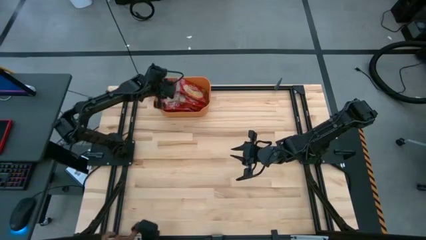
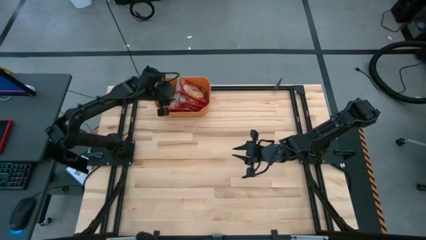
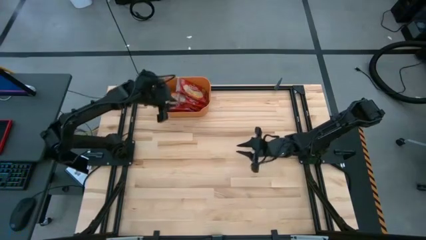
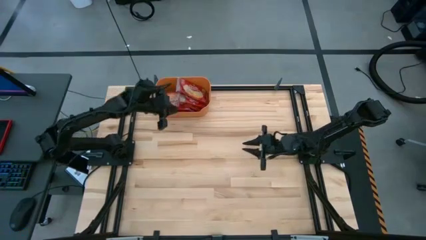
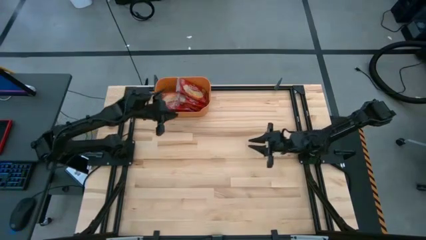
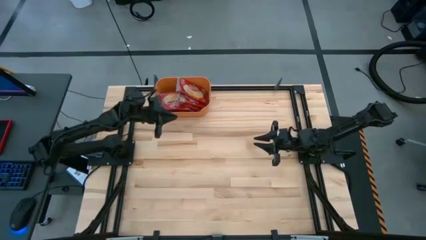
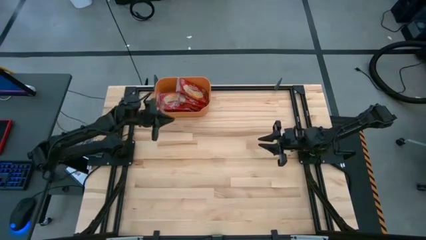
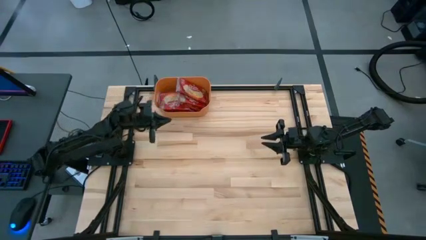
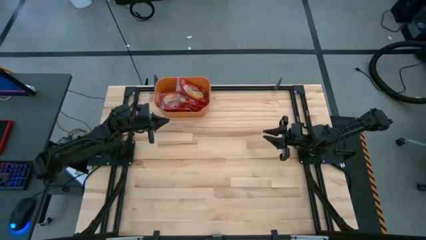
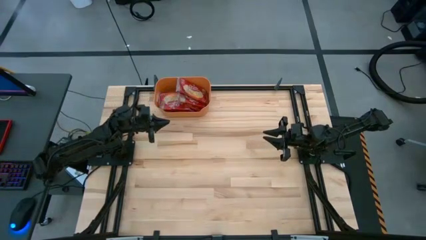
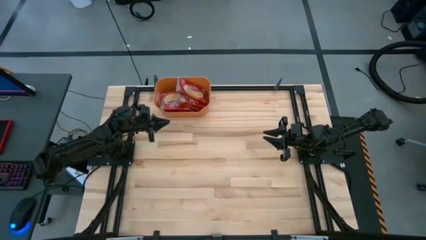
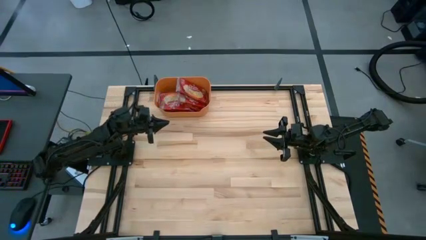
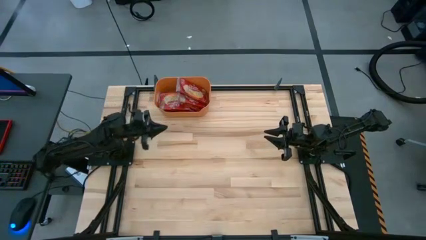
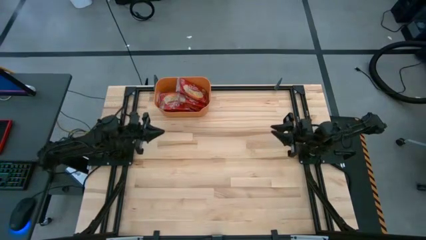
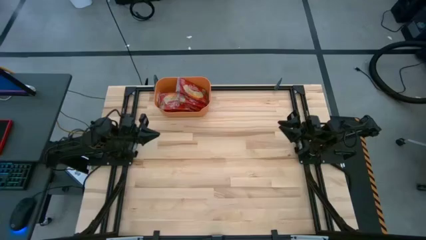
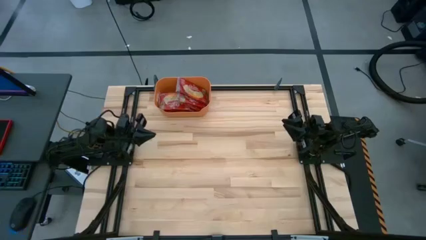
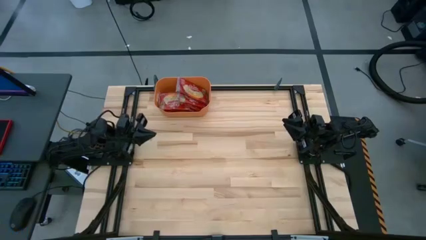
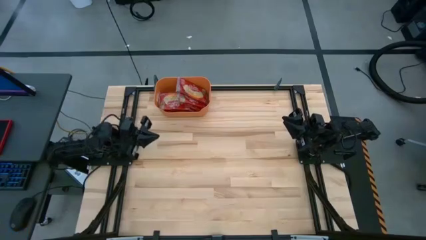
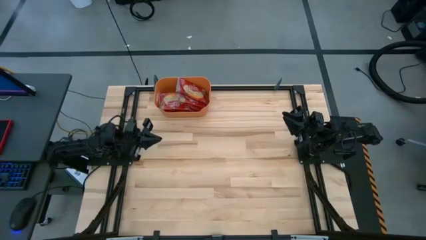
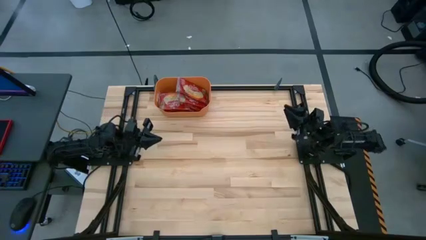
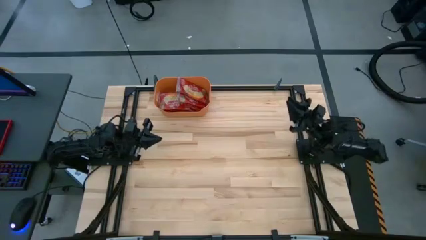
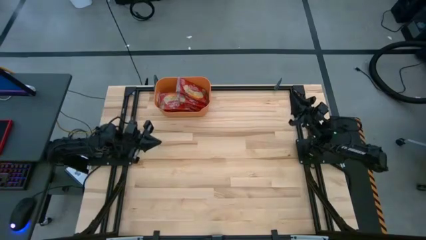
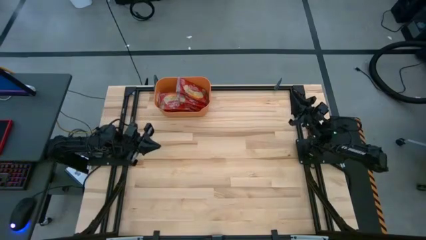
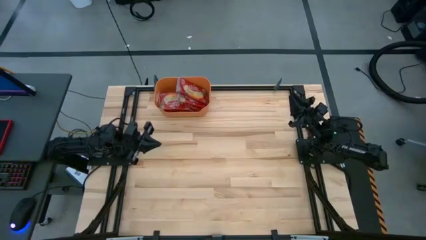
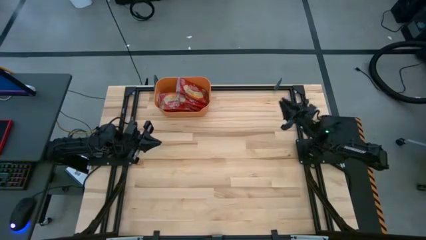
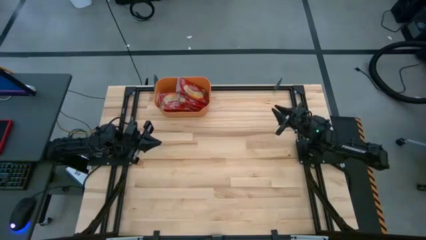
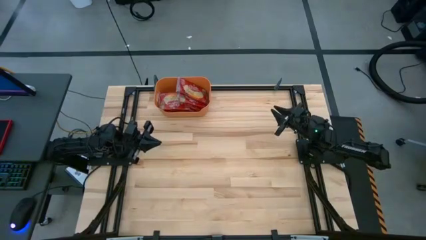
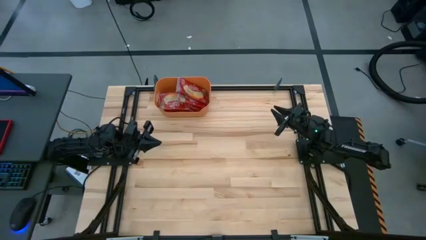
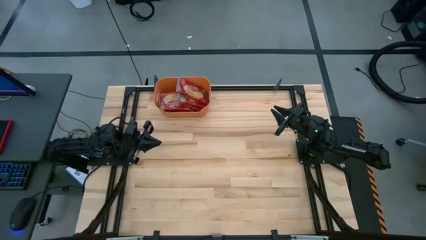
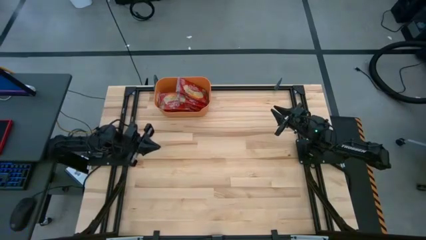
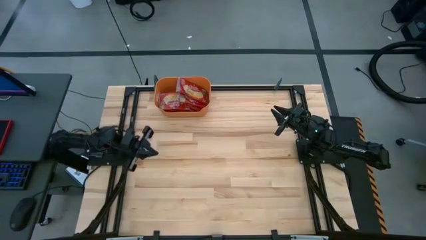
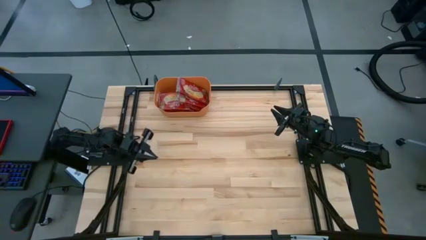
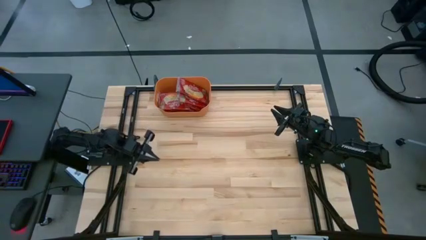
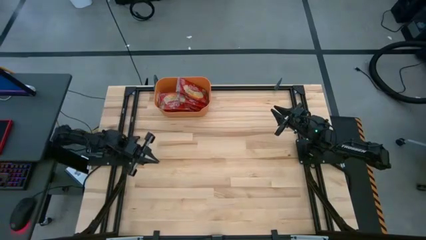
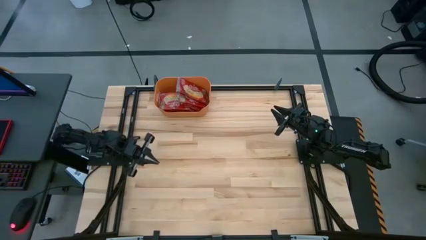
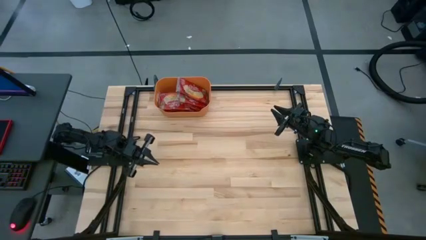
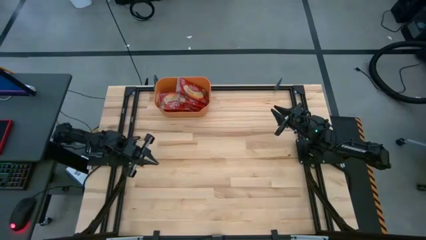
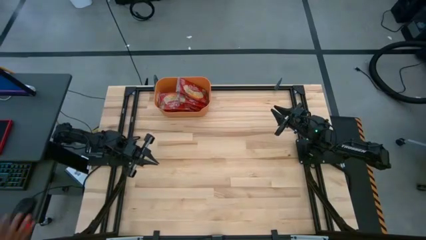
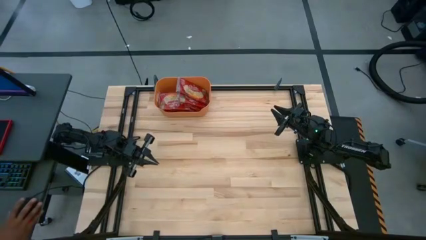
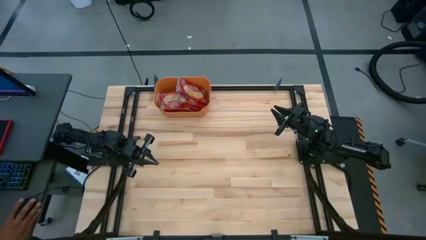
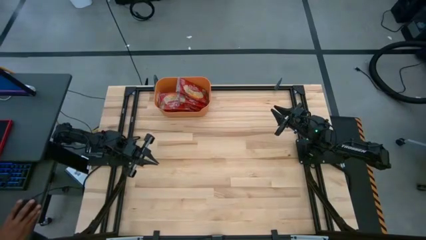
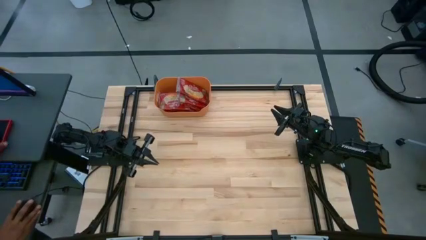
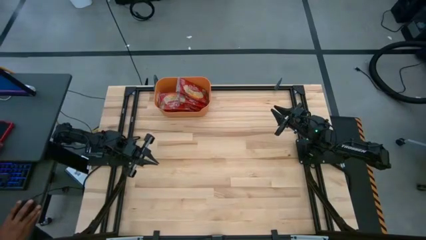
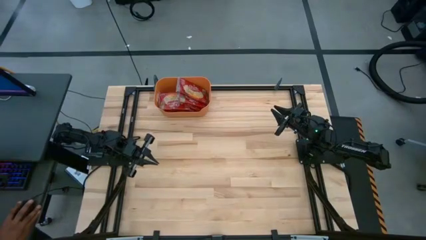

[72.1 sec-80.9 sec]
Task: Sort popcorn bags into baskets
Return to Home Position
